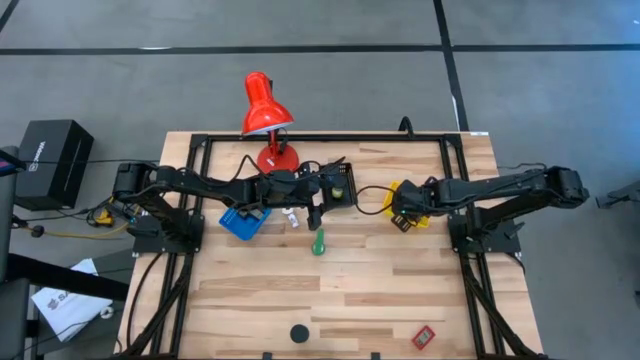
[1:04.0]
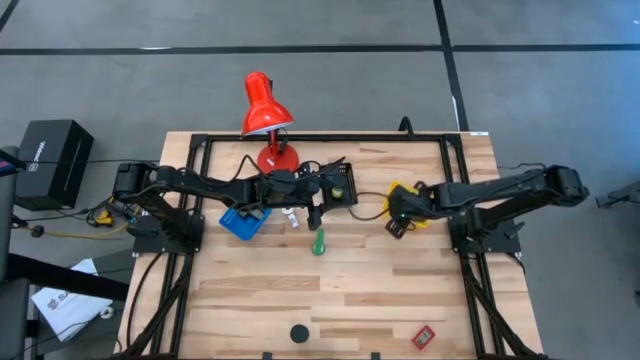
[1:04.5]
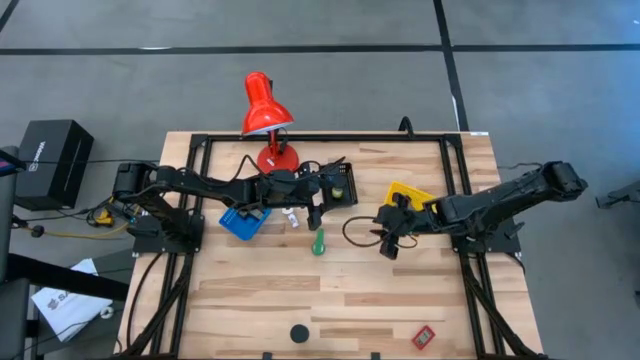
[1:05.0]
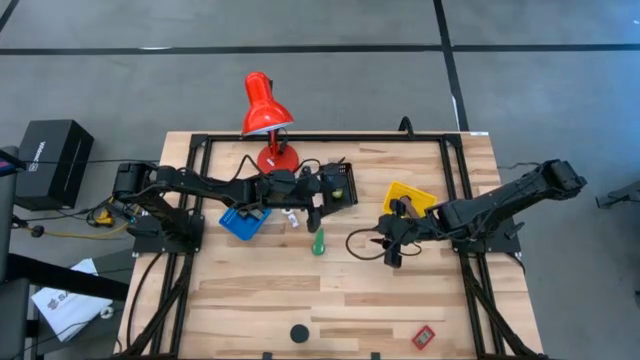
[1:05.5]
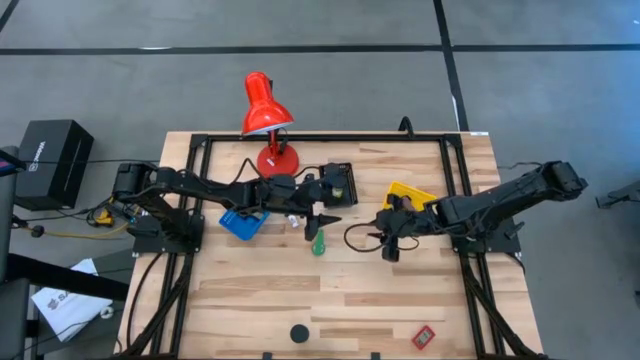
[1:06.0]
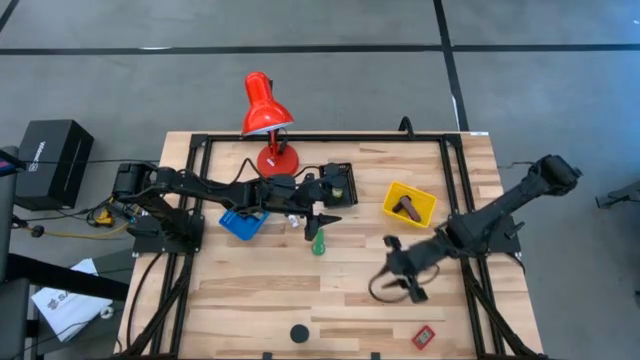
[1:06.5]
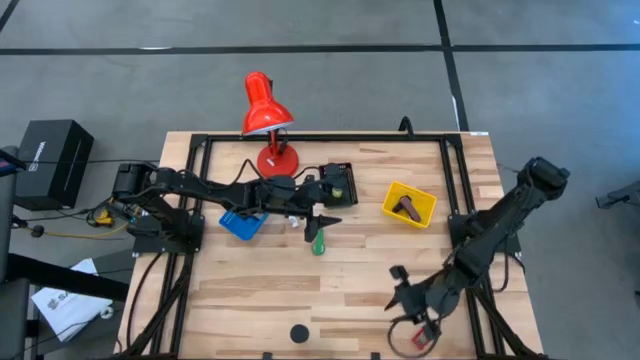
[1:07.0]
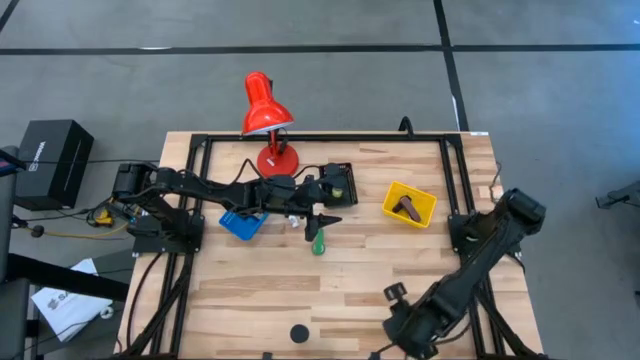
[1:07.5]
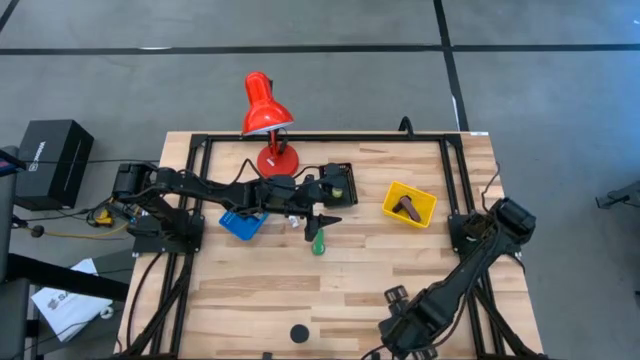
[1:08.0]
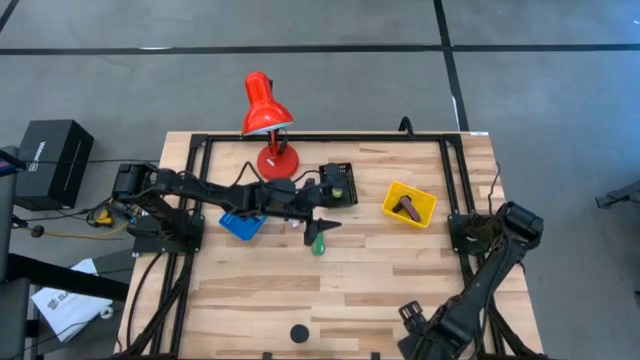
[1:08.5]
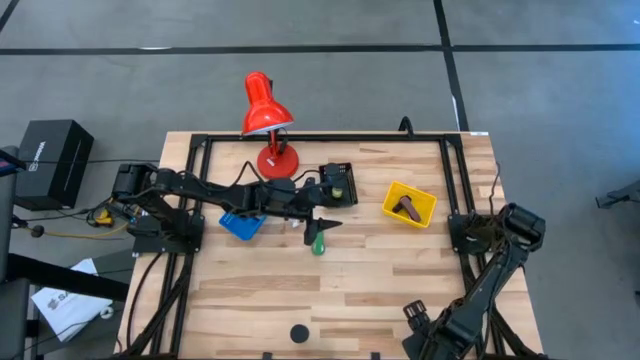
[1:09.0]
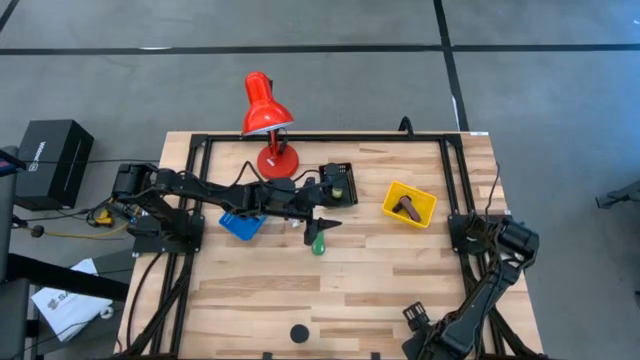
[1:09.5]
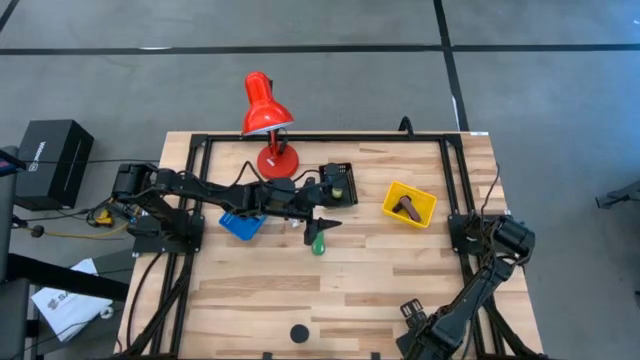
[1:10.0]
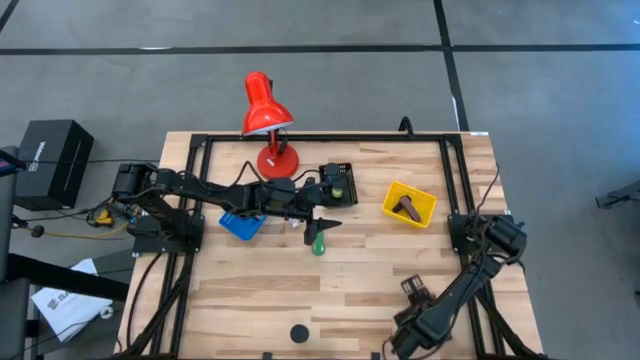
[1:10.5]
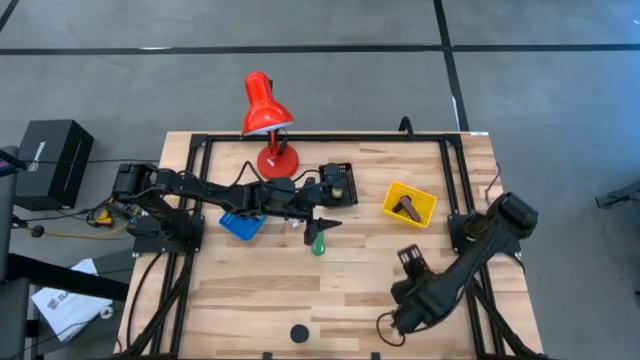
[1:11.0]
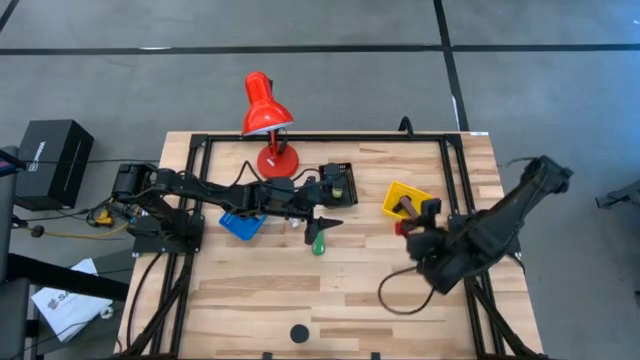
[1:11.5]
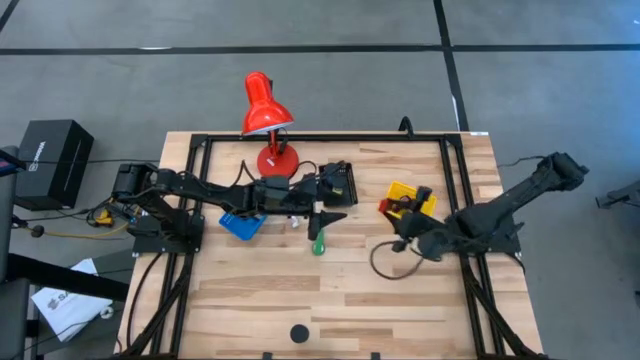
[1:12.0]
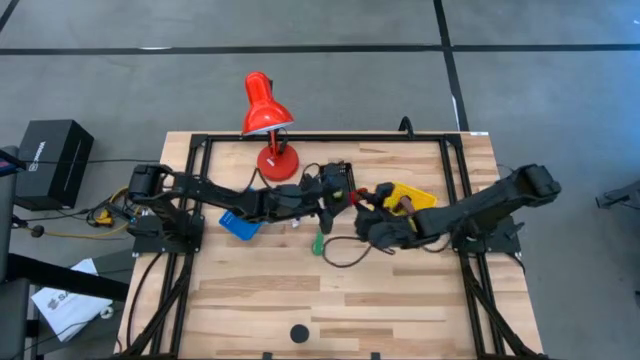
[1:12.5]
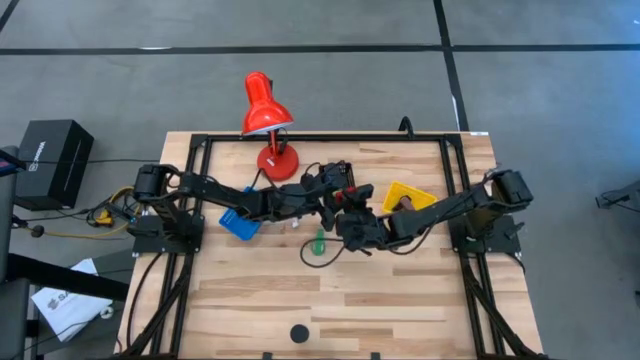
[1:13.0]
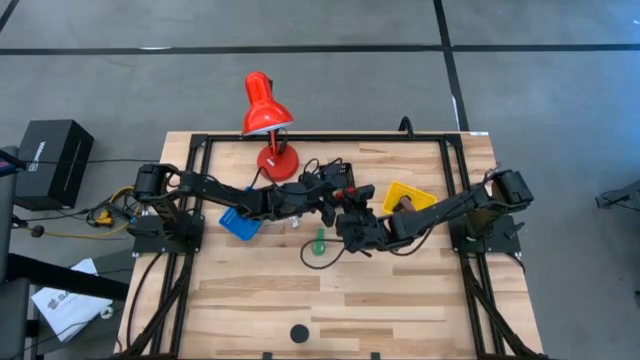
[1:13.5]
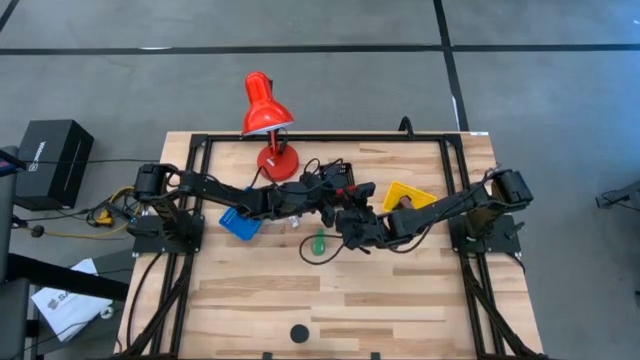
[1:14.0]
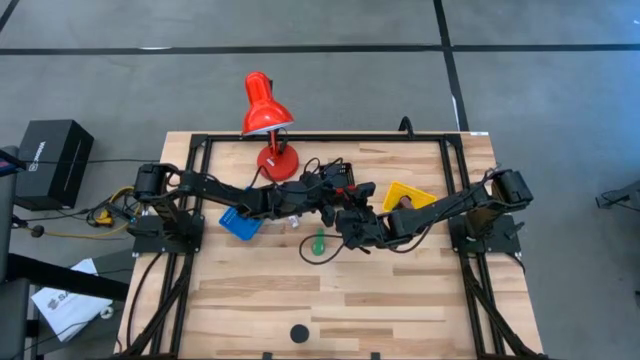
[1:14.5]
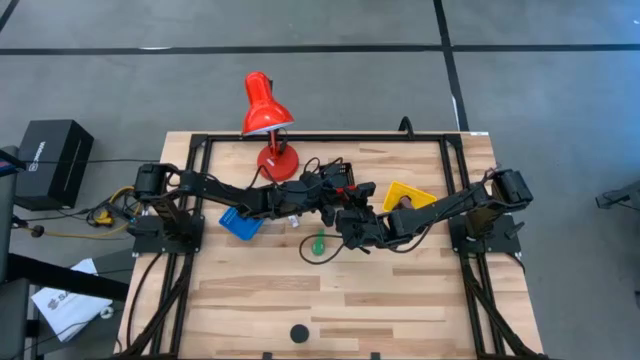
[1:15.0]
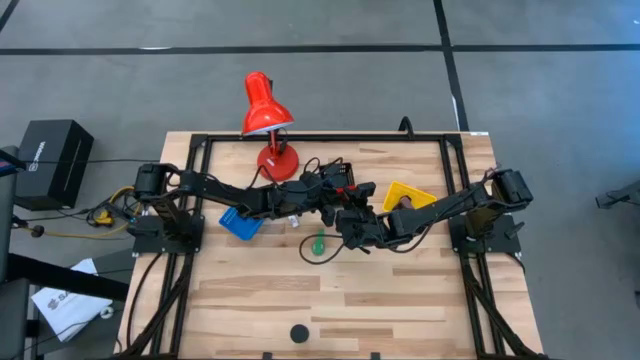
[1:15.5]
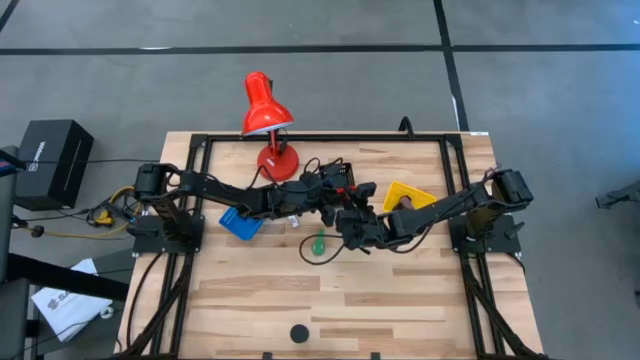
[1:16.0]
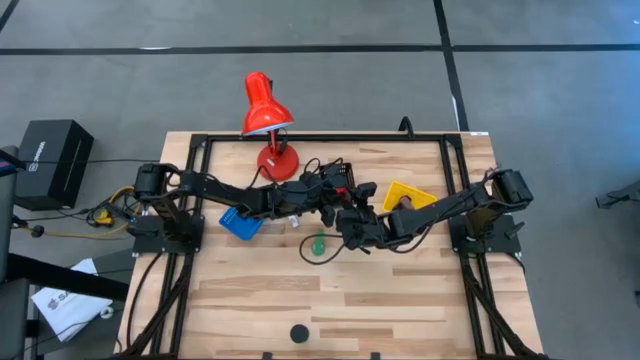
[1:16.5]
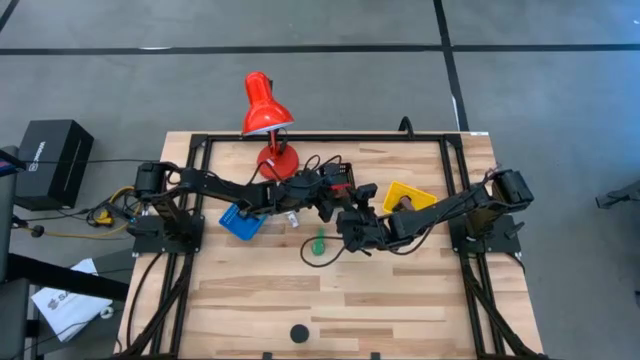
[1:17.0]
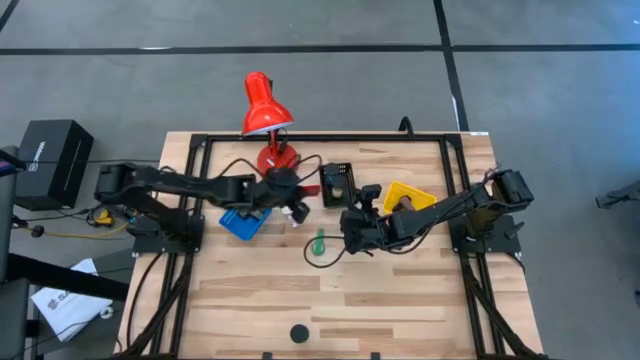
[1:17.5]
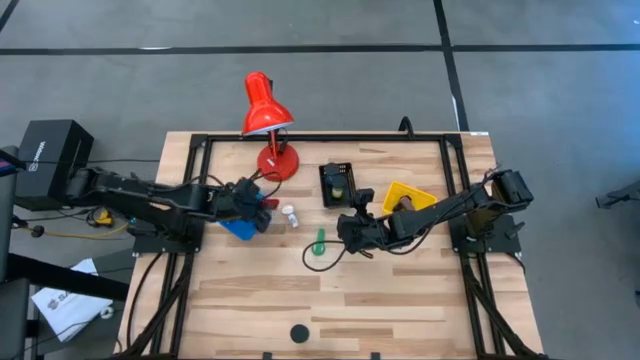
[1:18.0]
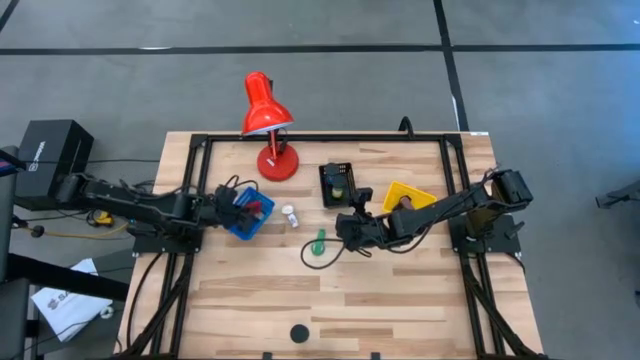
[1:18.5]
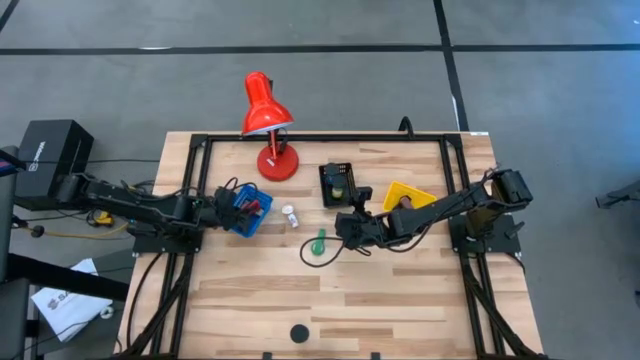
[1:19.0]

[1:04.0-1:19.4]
Task: Pick & Place Office items
Put the red digital clock into the blue basket

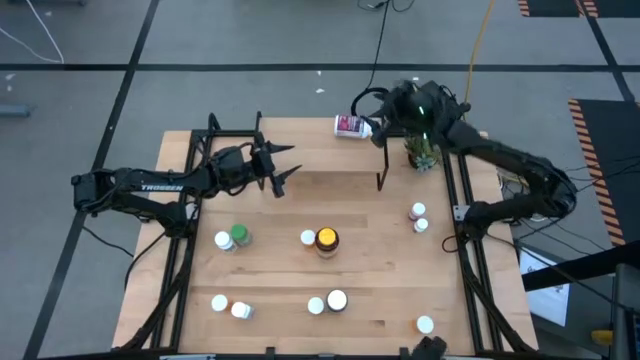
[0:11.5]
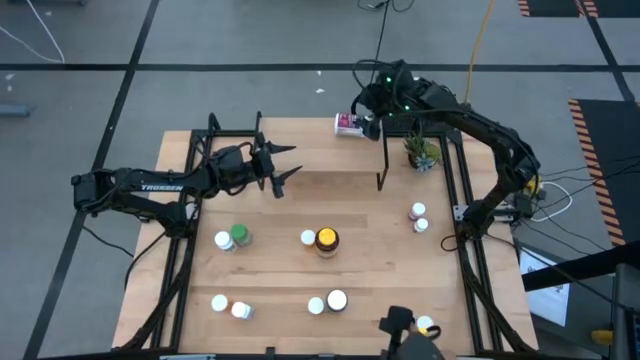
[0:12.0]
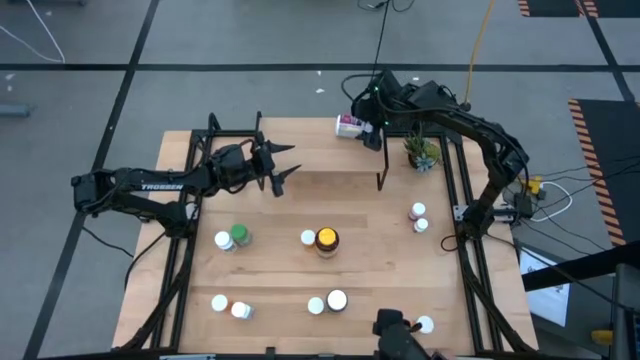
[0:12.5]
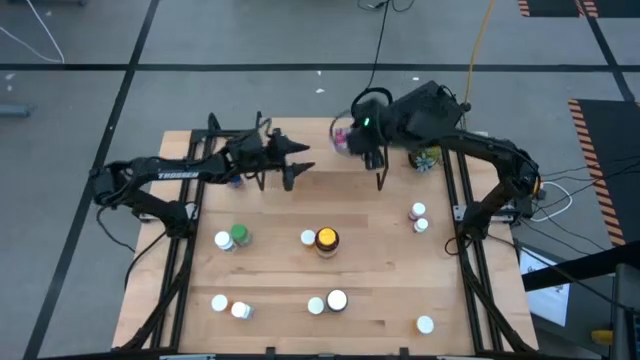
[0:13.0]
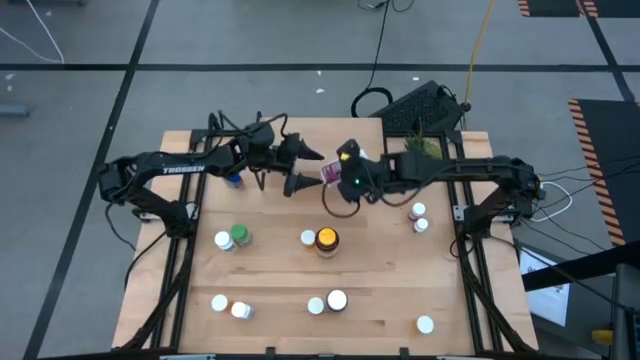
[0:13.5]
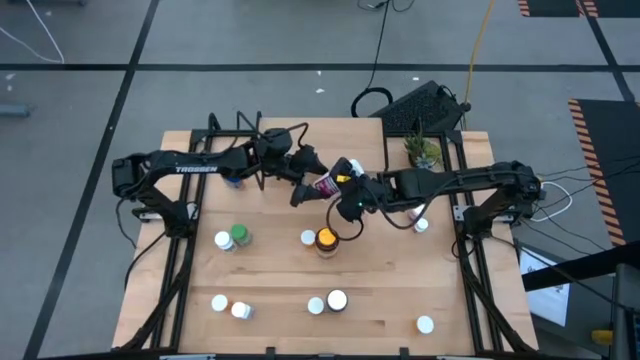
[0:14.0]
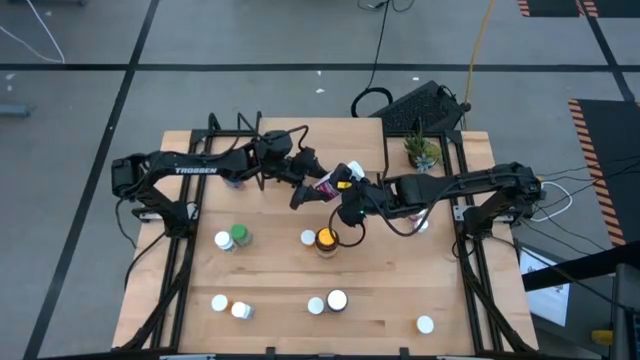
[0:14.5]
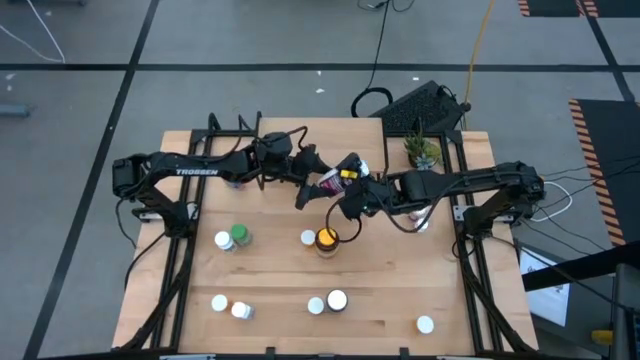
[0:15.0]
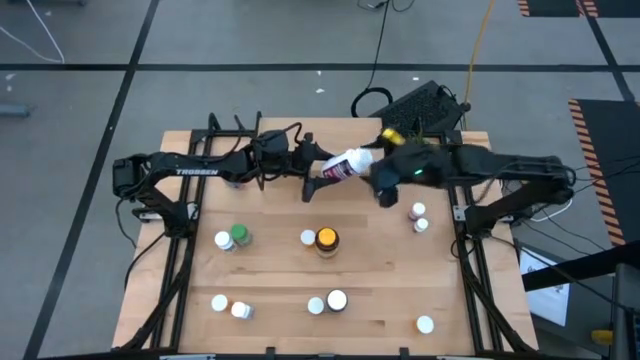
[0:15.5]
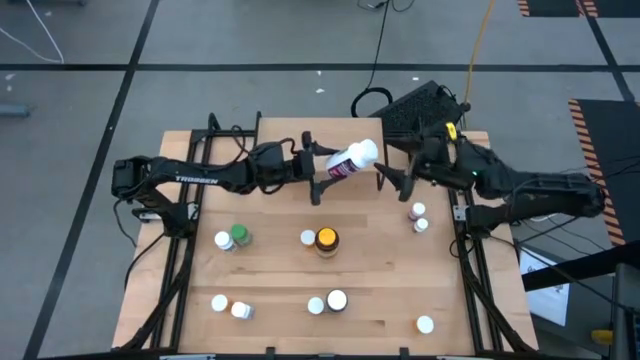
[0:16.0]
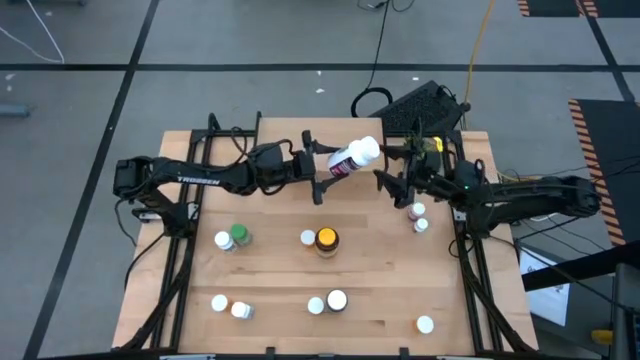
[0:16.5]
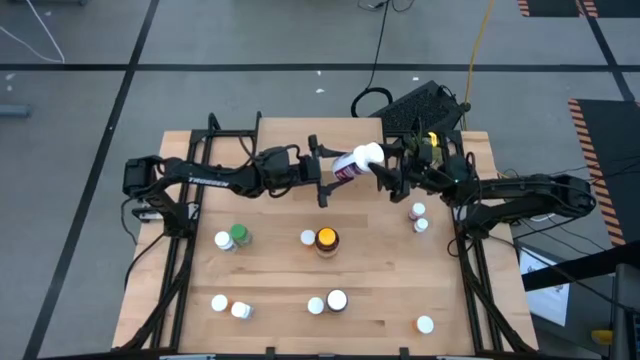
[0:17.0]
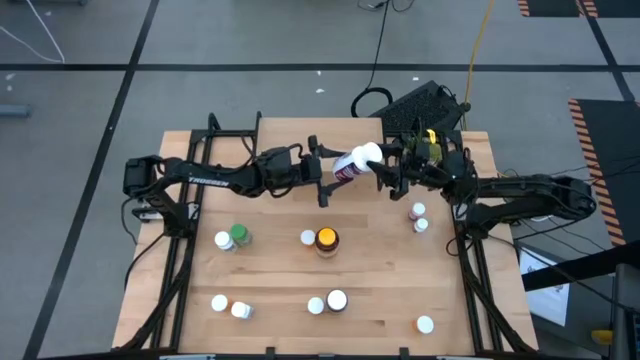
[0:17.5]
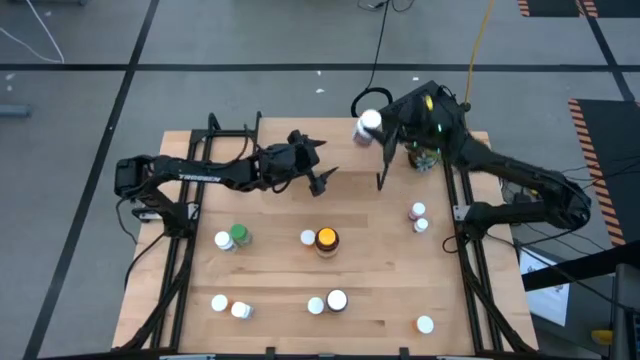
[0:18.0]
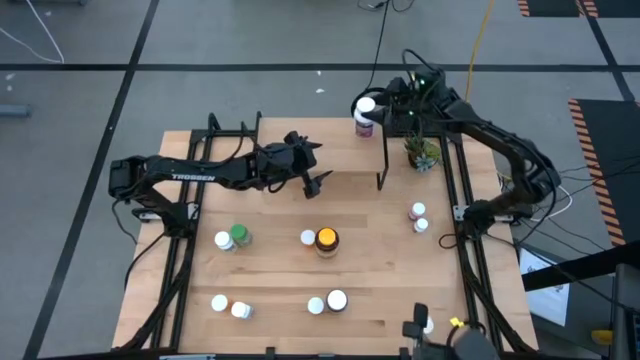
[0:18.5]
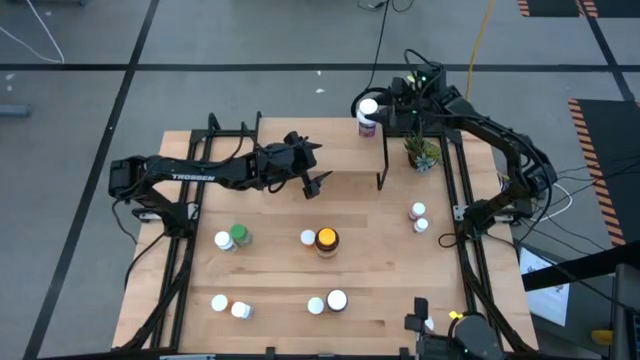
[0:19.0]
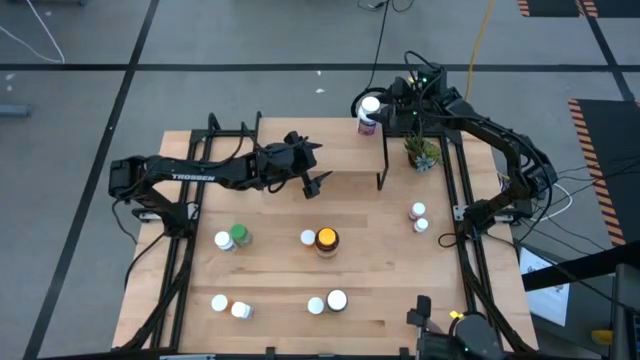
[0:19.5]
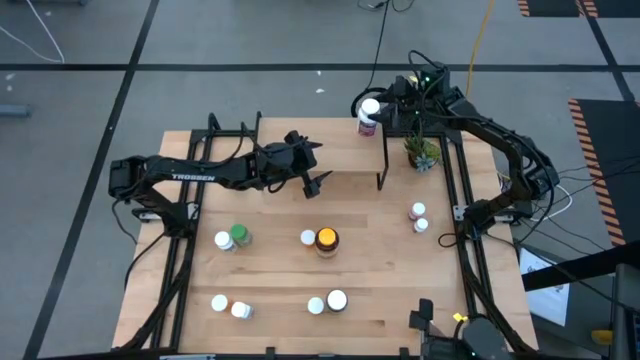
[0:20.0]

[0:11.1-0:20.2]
Task: Pick and place medicine bottles onto shelf by color
Put the white pill bottle on the shelf
